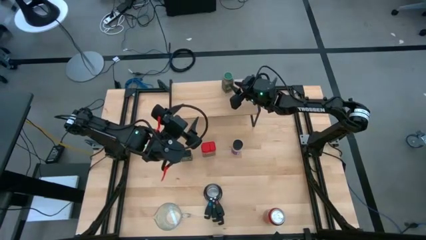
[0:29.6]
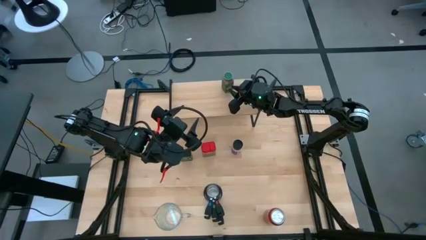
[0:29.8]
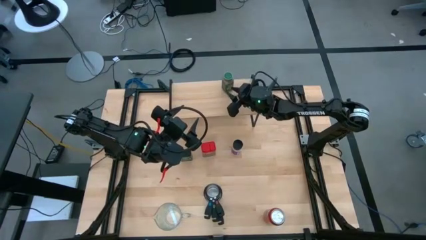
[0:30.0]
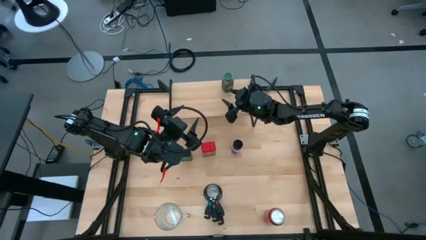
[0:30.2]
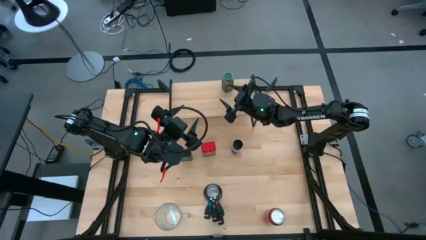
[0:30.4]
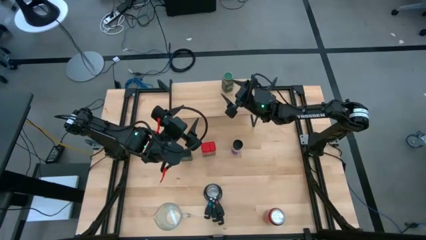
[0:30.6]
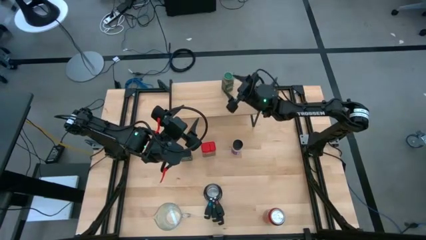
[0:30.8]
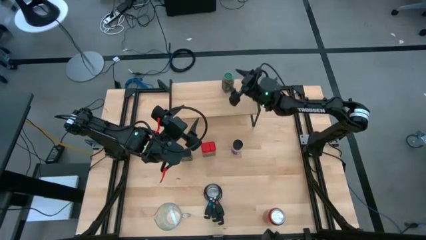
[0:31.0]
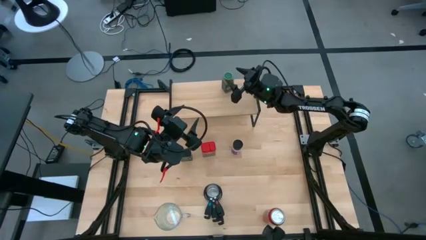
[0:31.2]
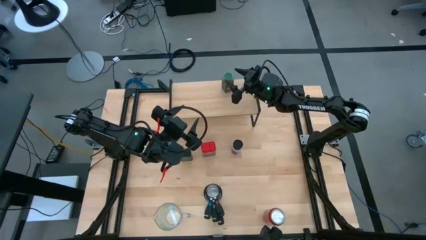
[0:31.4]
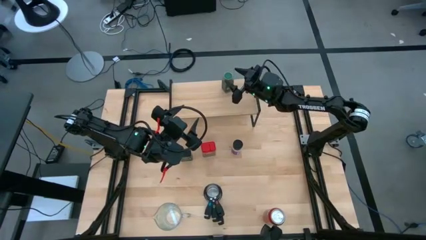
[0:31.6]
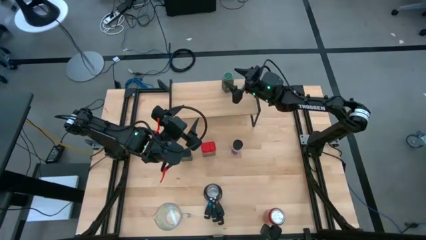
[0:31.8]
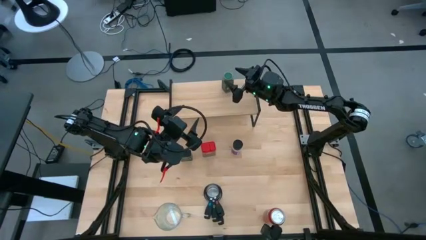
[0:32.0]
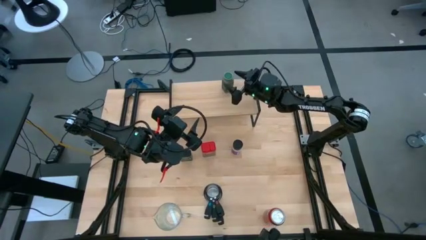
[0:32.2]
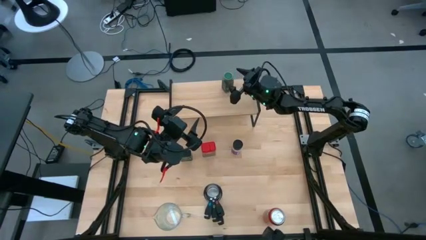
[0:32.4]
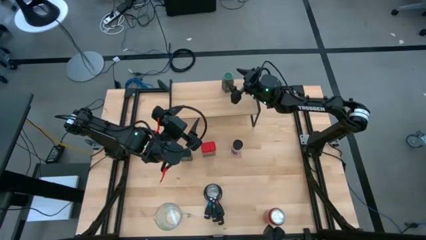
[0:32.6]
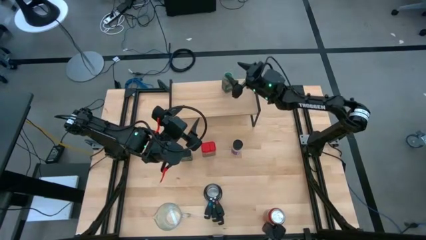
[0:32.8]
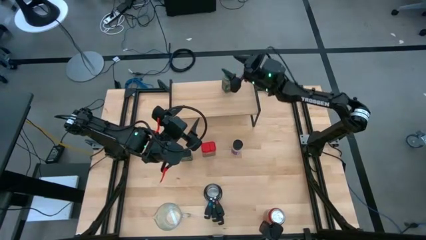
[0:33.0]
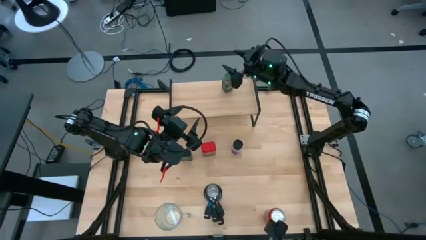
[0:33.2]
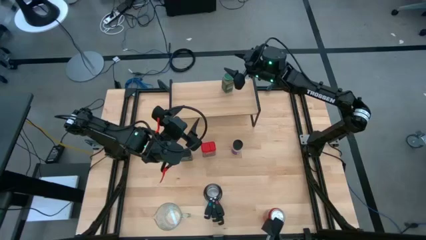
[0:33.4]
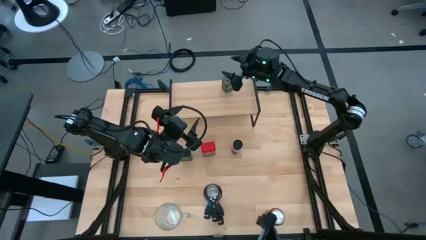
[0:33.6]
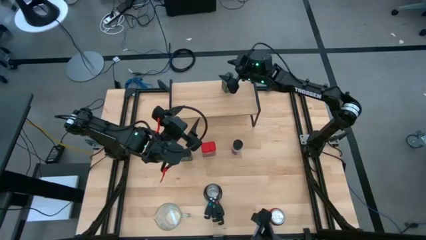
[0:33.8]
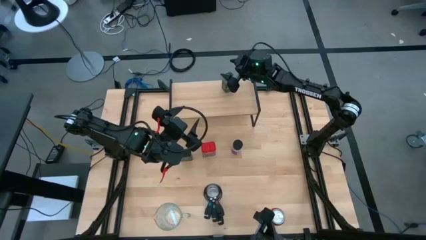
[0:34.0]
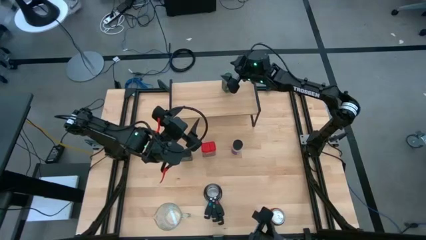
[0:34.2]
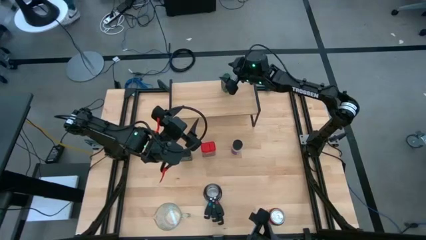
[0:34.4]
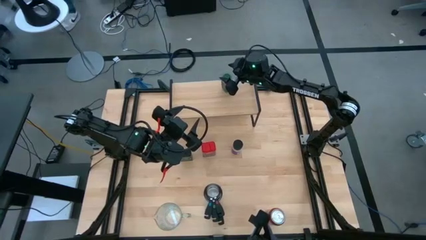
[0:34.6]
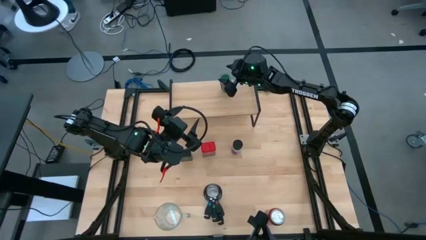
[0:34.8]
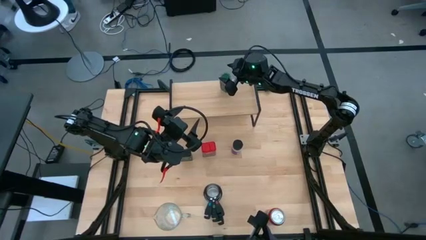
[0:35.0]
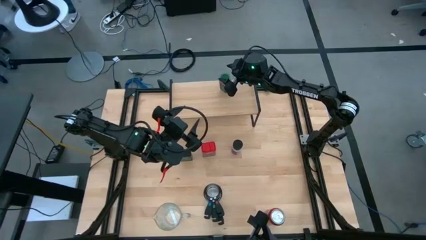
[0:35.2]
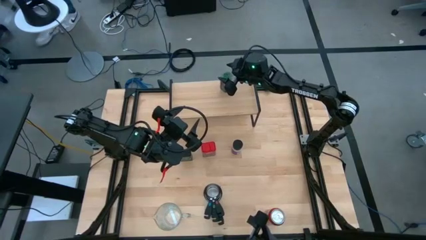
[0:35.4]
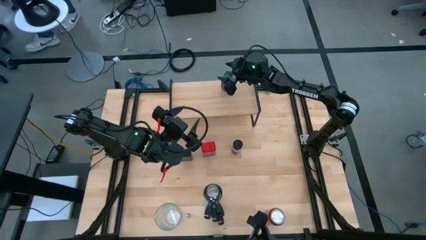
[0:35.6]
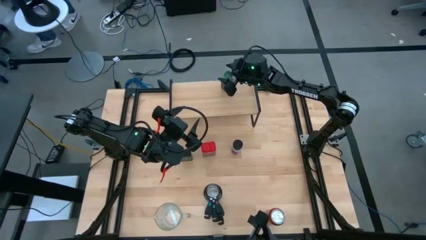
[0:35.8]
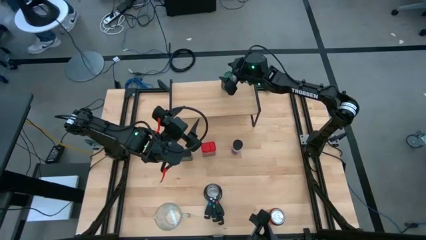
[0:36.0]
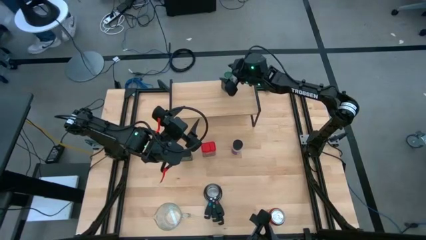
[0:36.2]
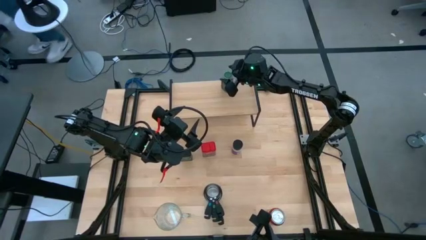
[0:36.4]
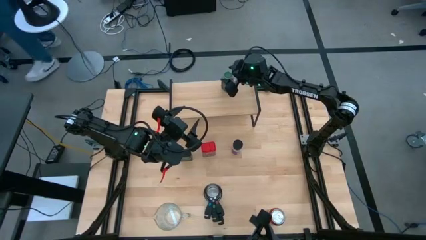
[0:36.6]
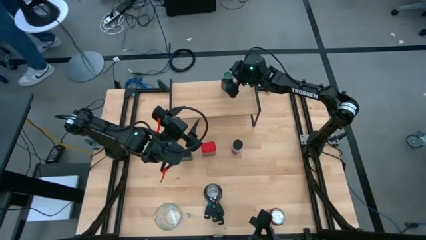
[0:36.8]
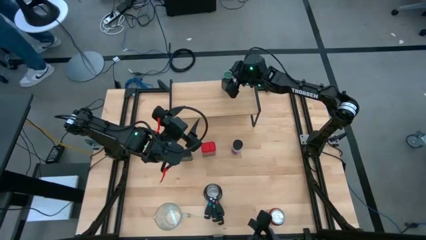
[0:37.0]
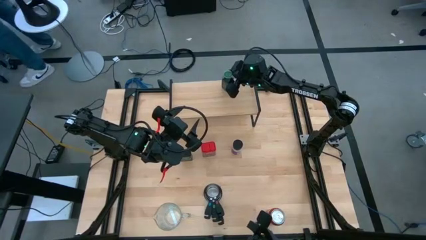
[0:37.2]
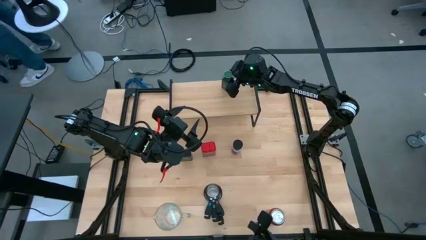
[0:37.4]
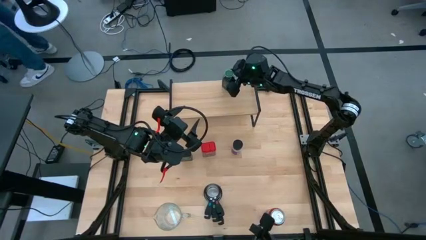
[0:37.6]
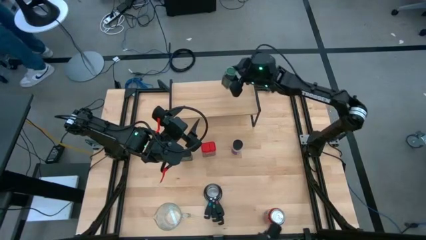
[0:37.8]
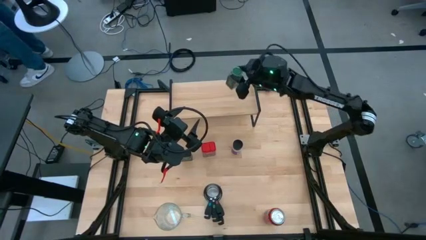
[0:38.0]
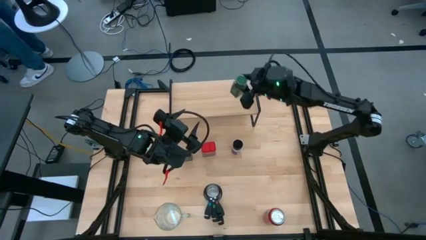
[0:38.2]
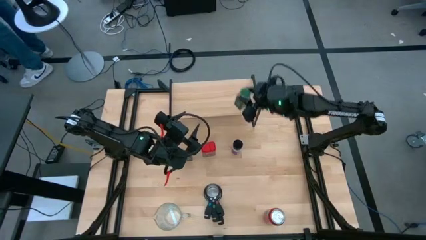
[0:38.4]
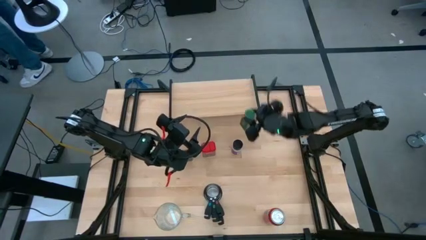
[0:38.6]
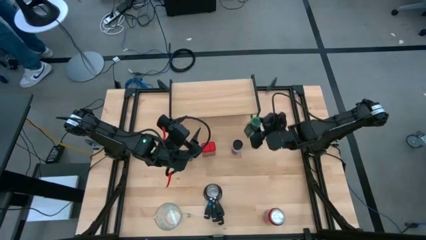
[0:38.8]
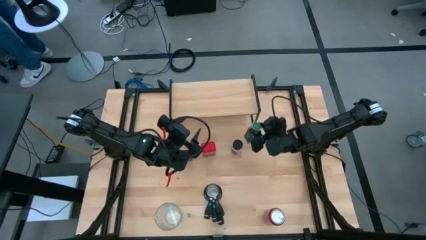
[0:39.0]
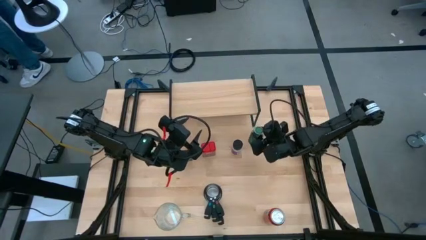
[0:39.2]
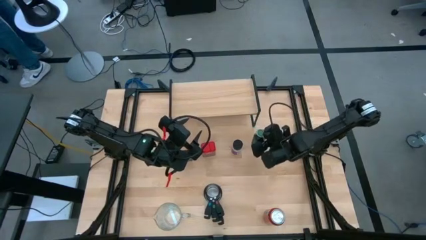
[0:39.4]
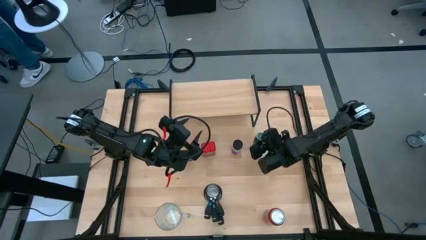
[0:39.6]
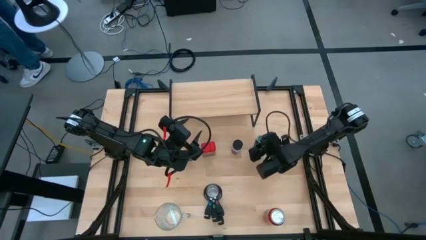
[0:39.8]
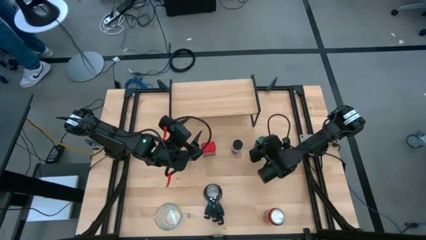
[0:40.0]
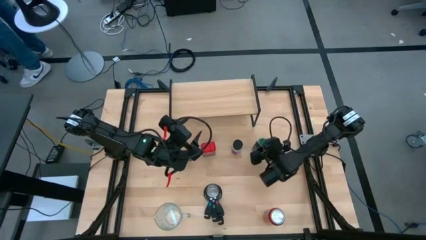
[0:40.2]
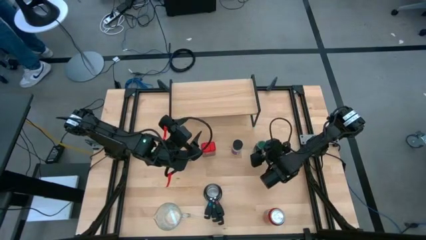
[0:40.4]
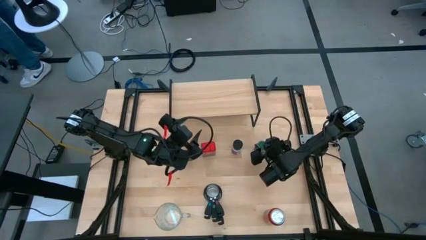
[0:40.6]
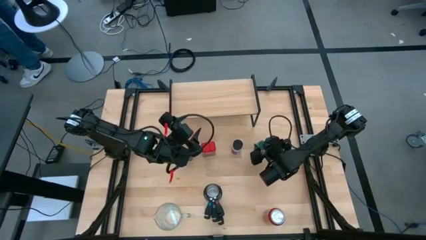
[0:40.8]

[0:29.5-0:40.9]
Task: Shelf spices
Remove the green seasoning bottle from the shelf

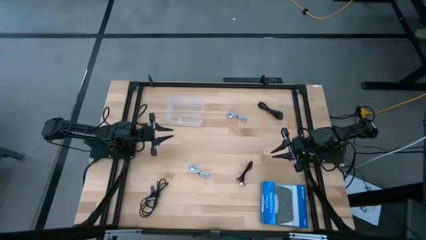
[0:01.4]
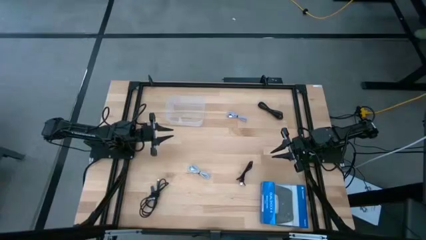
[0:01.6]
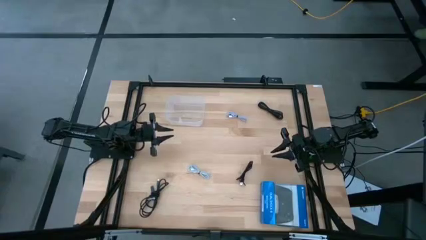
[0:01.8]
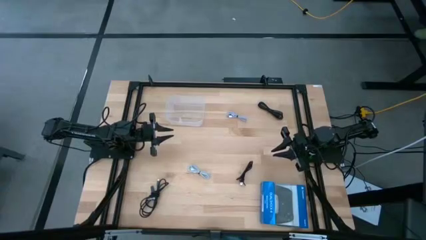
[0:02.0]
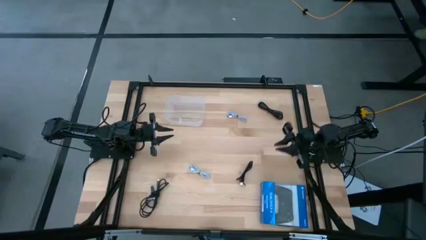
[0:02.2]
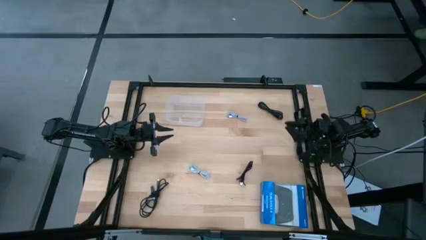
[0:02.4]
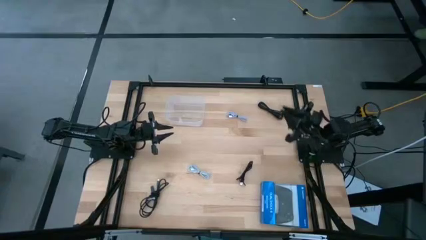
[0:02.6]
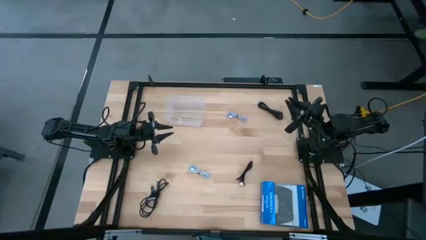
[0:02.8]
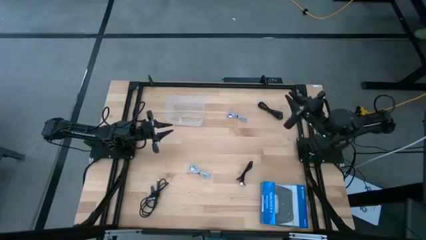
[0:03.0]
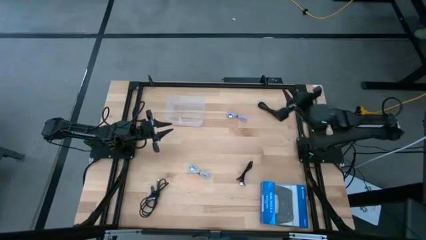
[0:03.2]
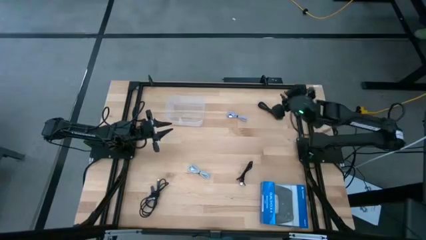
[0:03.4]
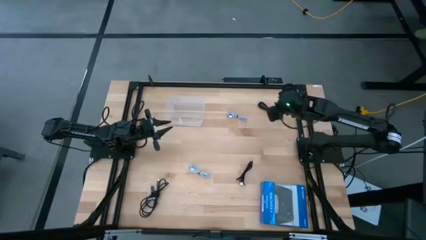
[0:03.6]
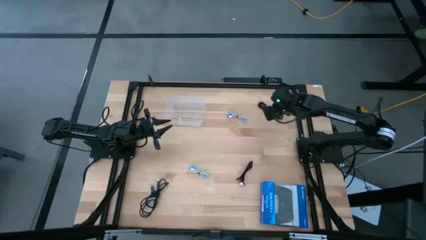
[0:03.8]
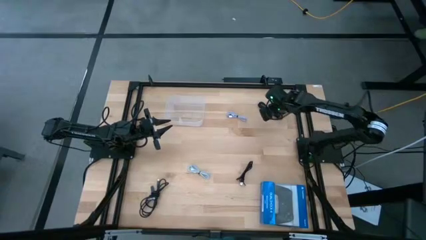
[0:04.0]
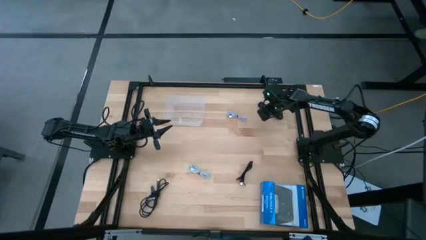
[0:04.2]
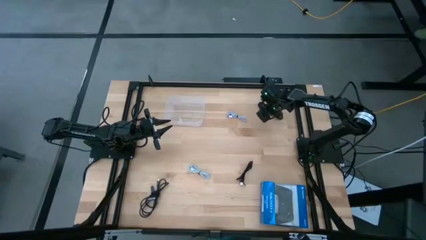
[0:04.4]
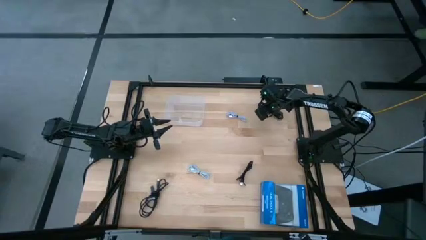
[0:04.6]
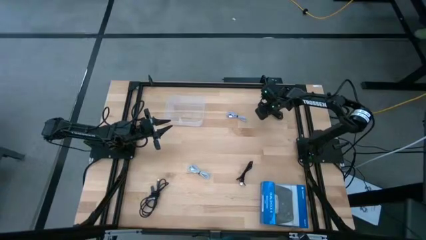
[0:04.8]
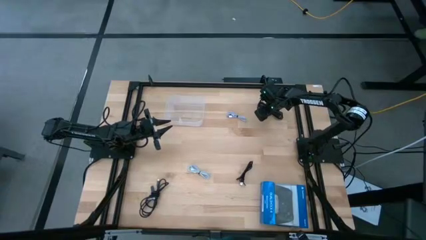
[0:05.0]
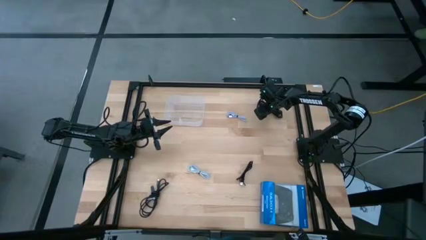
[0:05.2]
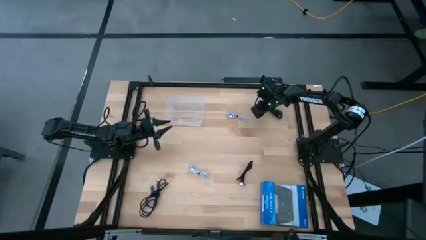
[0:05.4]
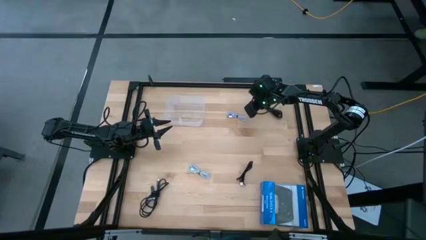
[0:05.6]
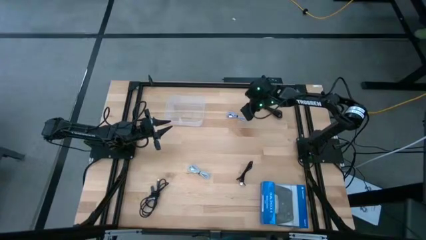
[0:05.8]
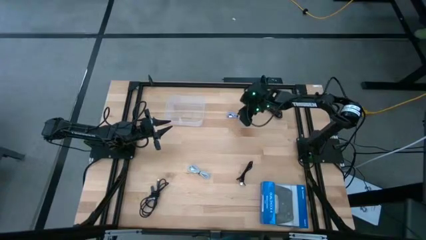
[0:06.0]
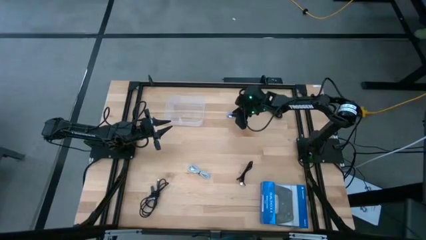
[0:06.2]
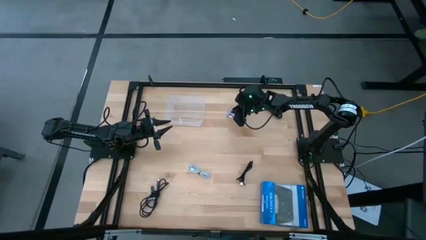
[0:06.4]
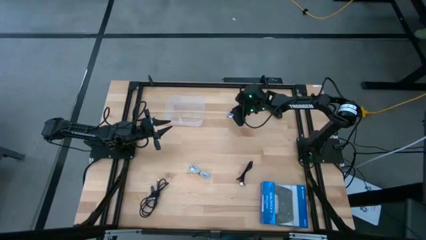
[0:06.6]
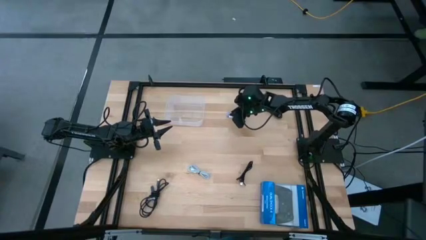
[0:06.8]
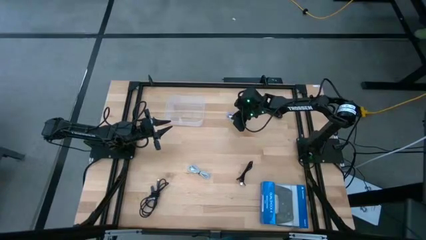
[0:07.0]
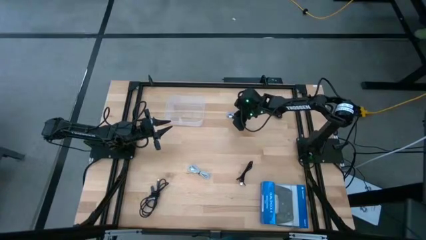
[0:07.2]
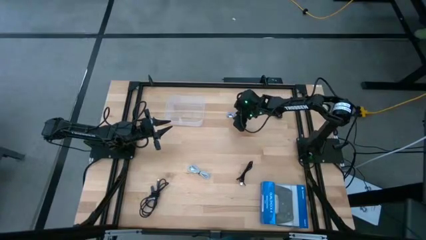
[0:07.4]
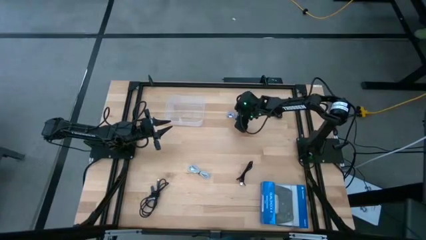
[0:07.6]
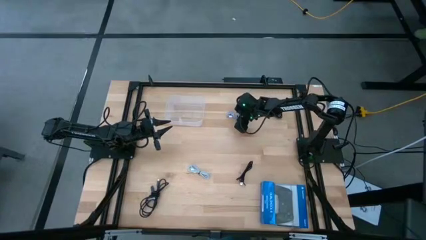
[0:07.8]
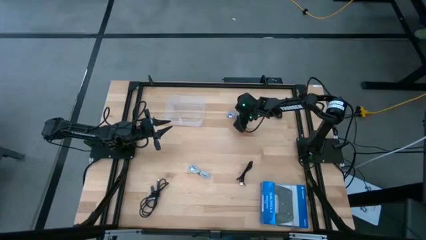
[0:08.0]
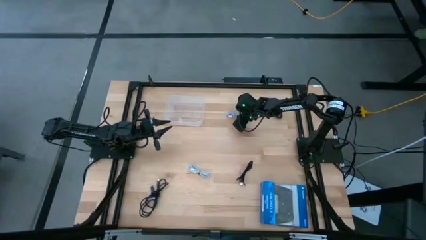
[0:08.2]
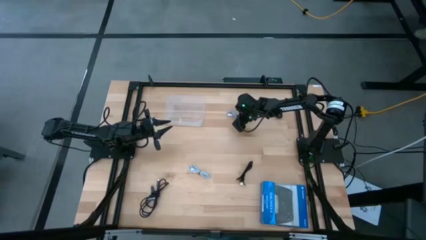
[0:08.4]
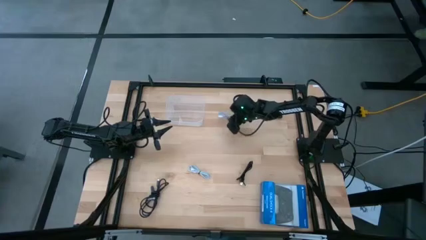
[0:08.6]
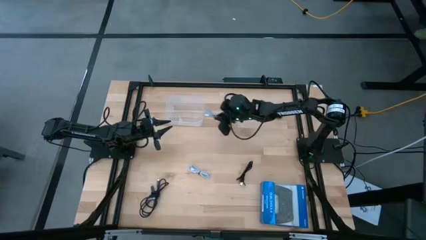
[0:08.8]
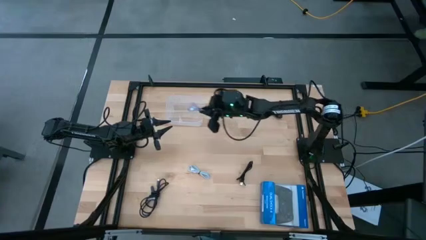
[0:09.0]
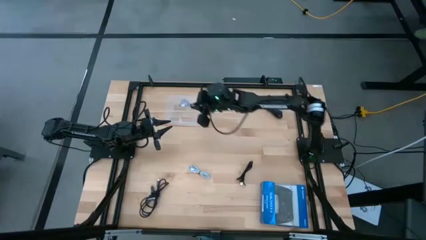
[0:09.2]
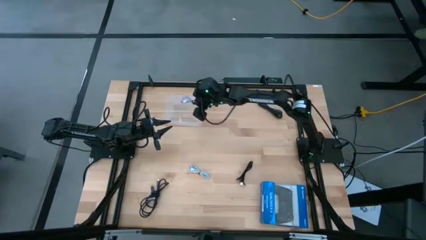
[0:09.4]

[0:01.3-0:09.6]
Task: Pick and place USB-C Cables
Put the purple white charger cable into the transparent bin
